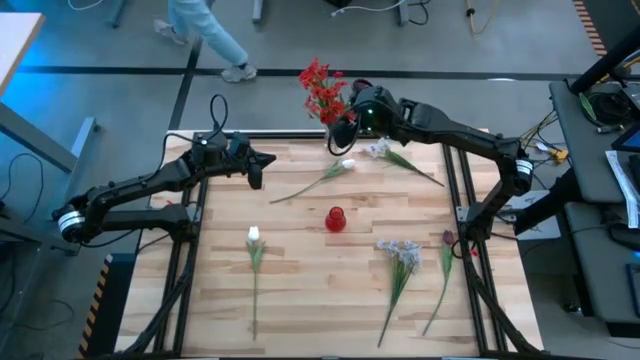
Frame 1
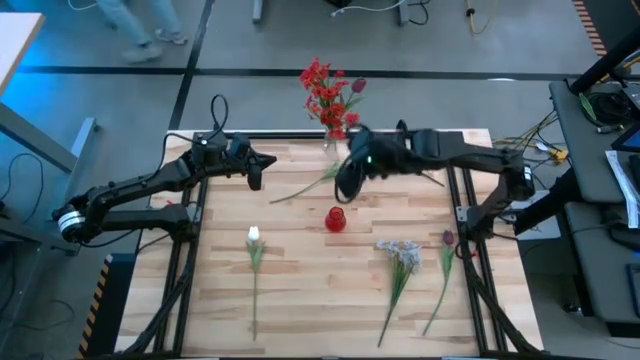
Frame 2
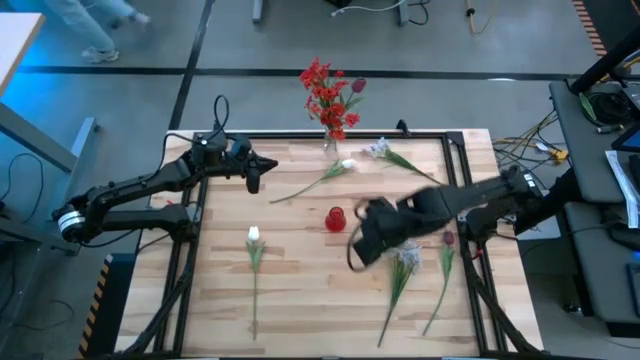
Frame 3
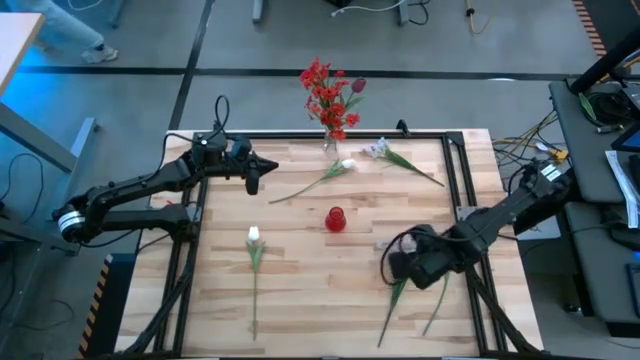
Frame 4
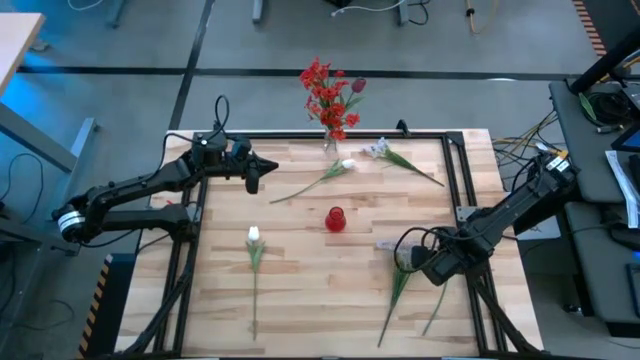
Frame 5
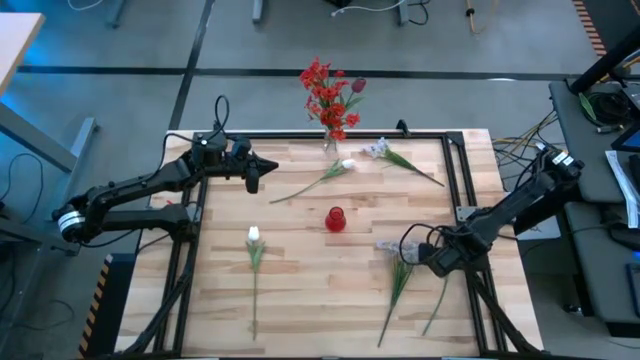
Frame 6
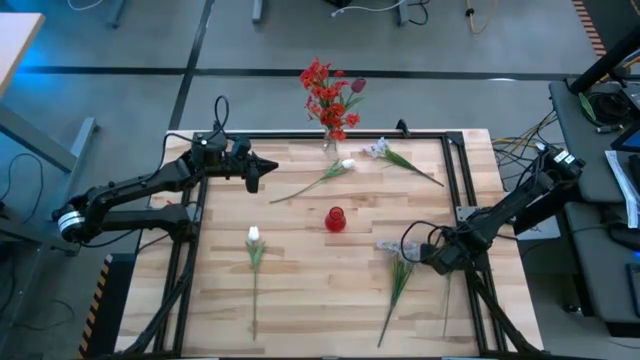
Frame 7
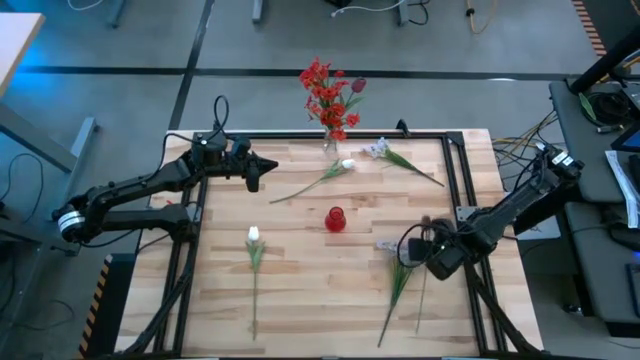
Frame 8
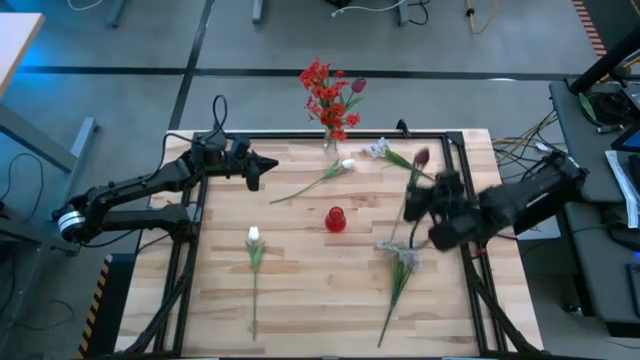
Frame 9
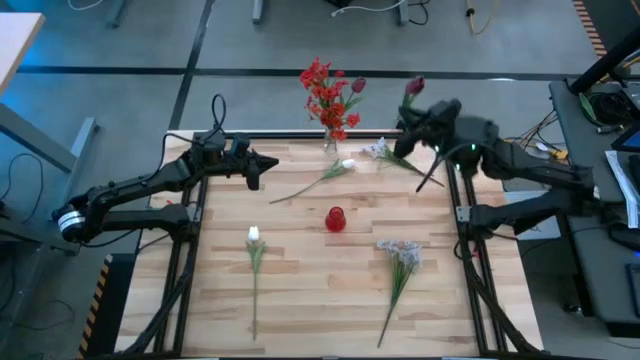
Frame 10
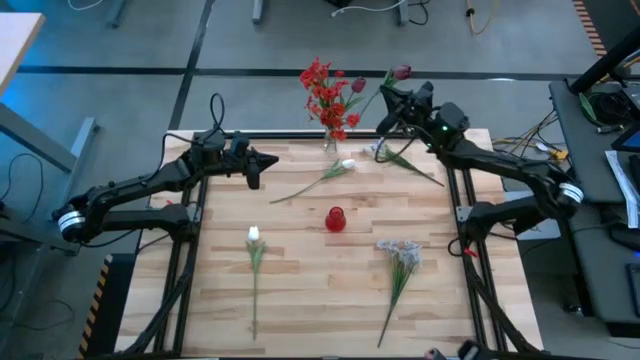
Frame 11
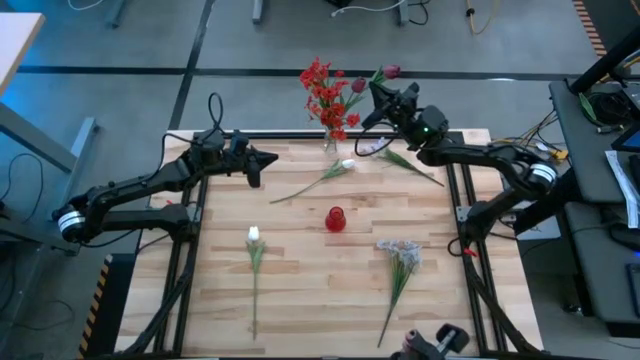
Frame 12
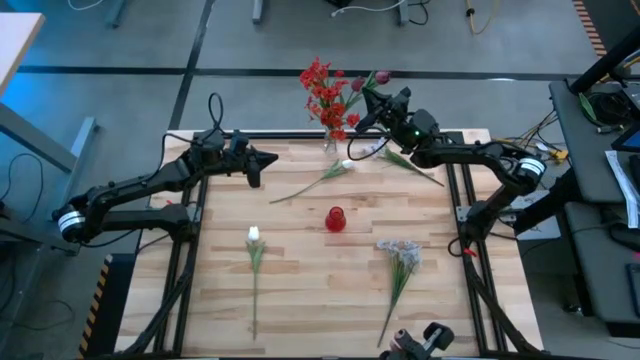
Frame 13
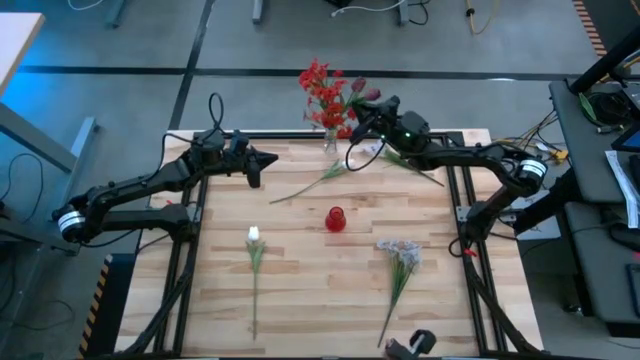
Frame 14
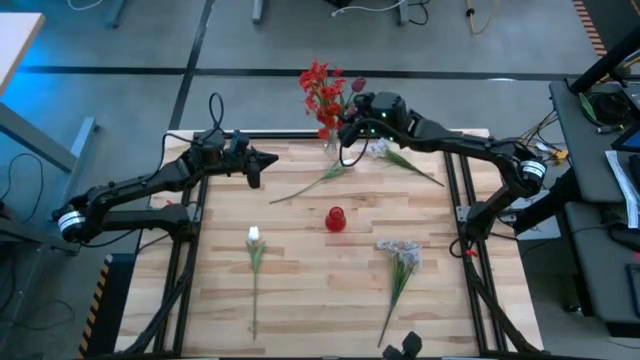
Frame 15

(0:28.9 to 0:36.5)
Task: Sort flowers into vase by color
Put the red tulip into the transparent vase

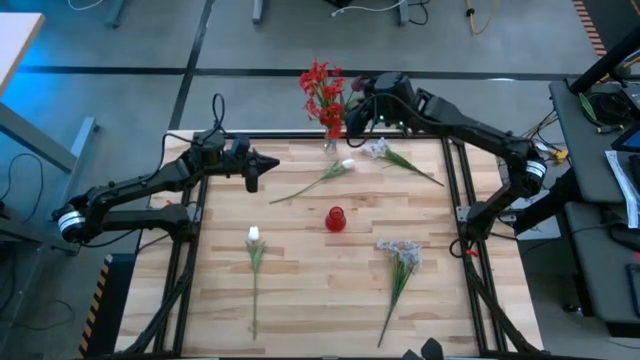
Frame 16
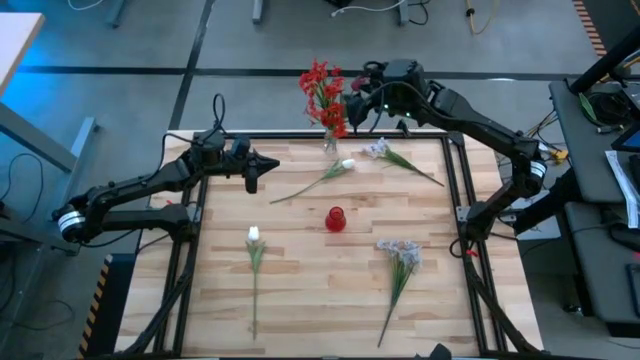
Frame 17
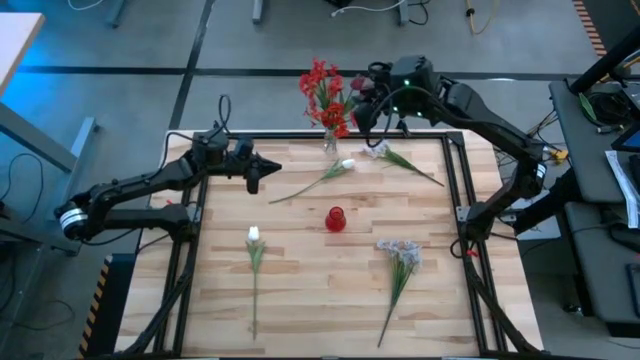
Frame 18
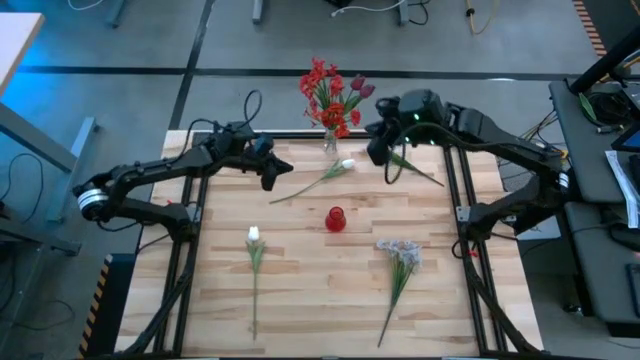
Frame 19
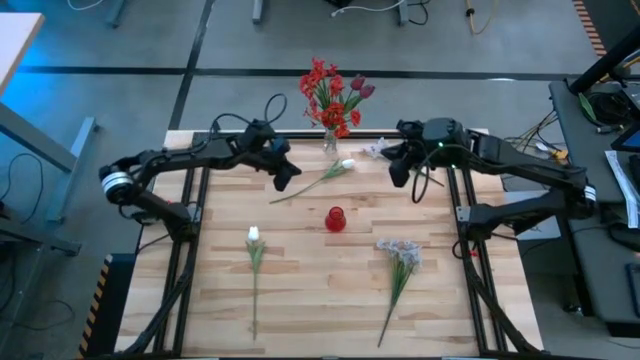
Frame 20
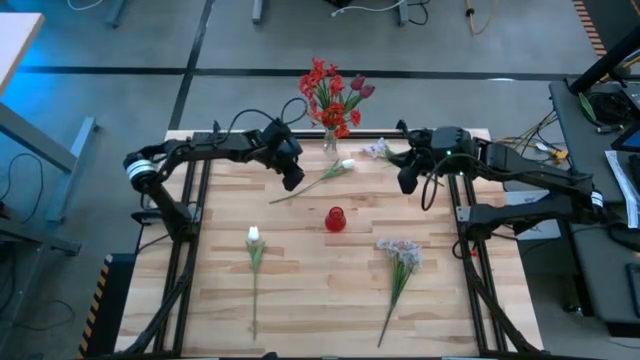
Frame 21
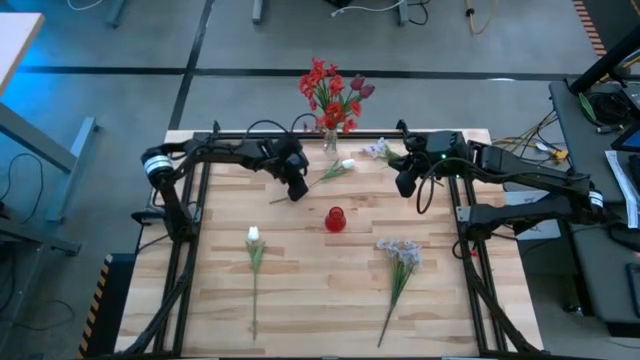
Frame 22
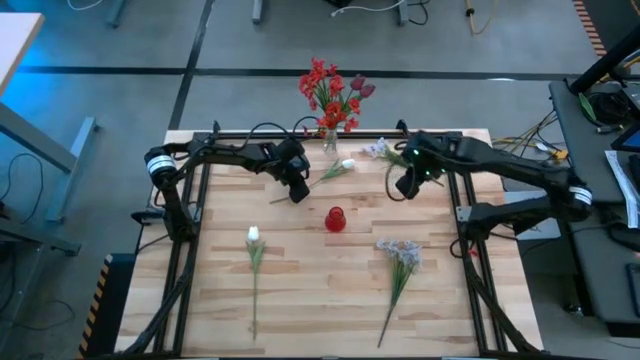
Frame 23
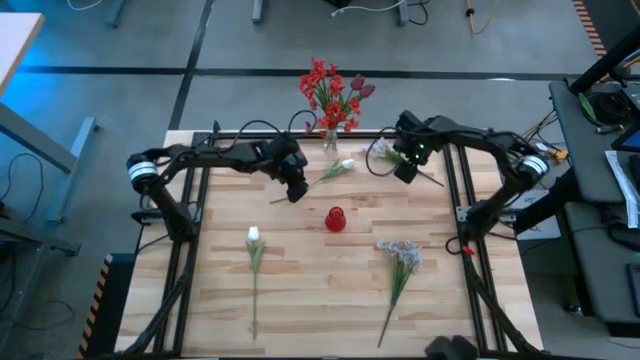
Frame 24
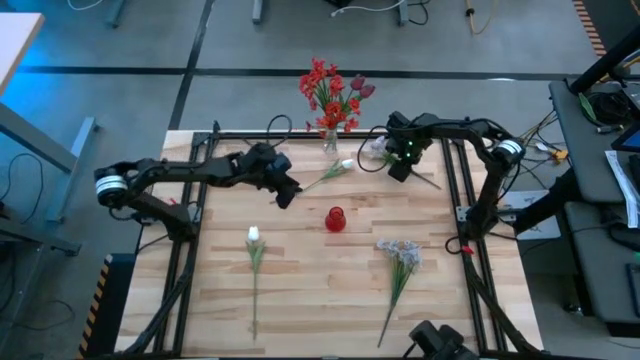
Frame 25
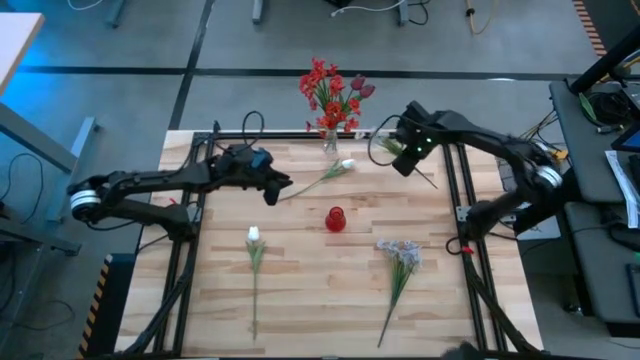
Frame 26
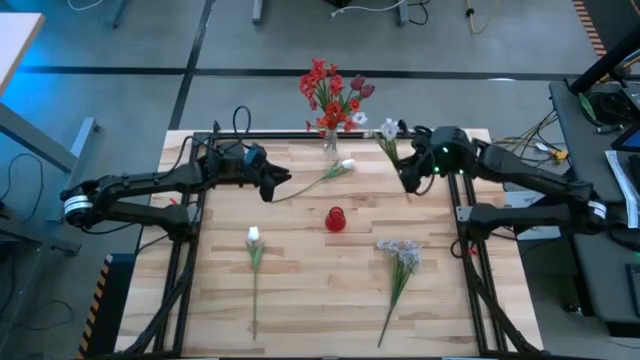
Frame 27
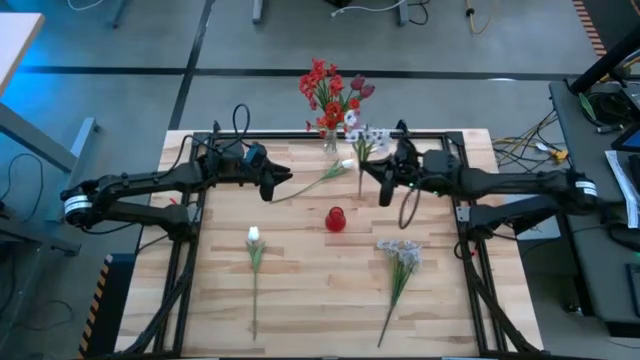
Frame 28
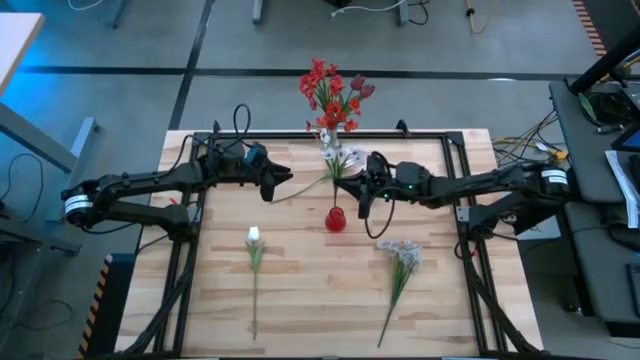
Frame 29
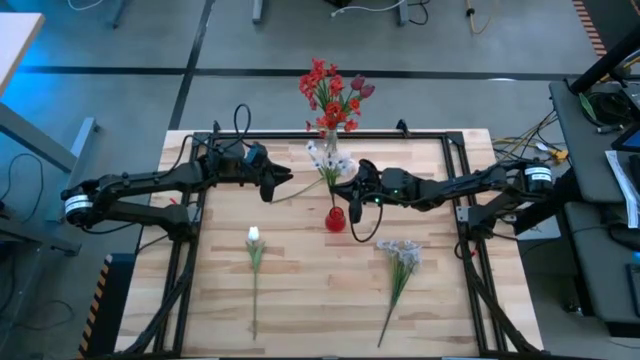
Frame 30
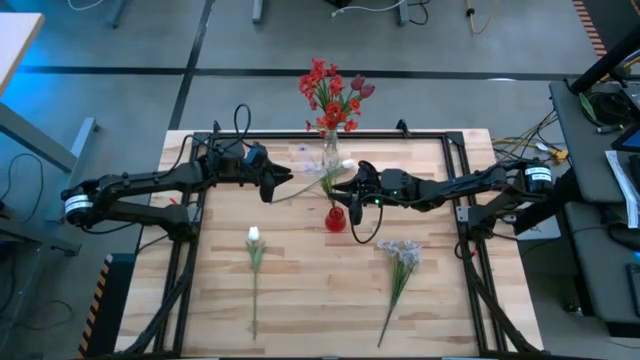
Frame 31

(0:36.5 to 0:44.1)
Put the top white flowers into the red vase

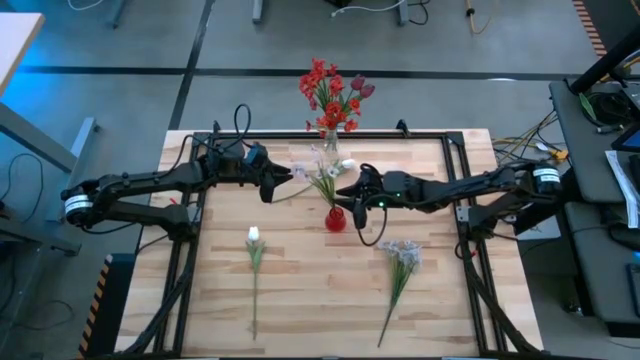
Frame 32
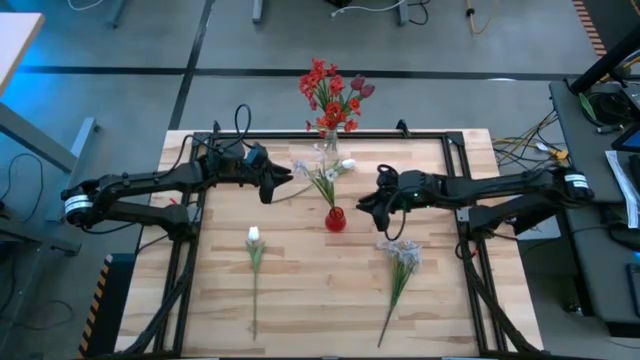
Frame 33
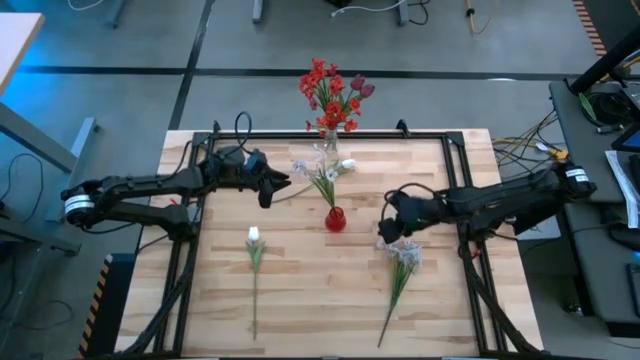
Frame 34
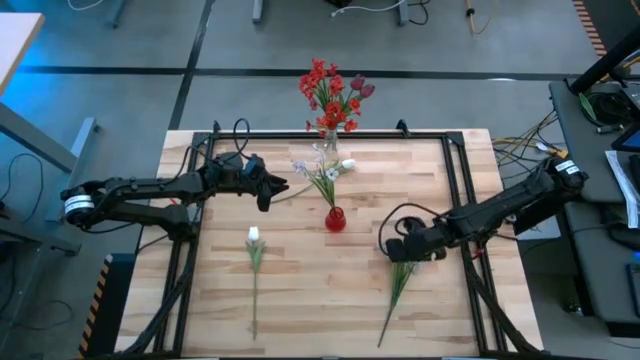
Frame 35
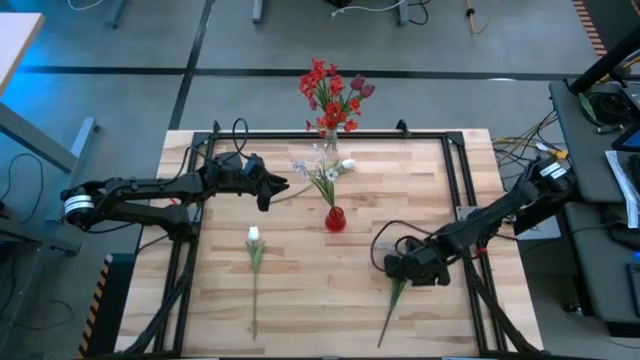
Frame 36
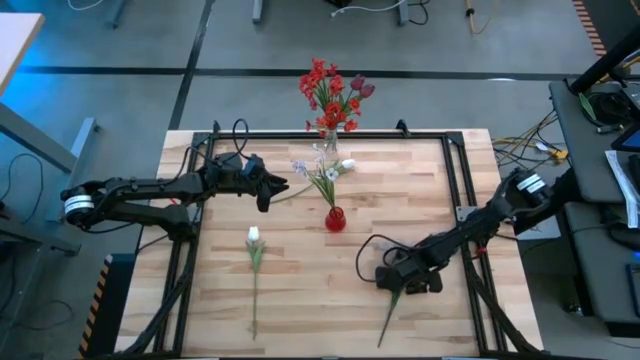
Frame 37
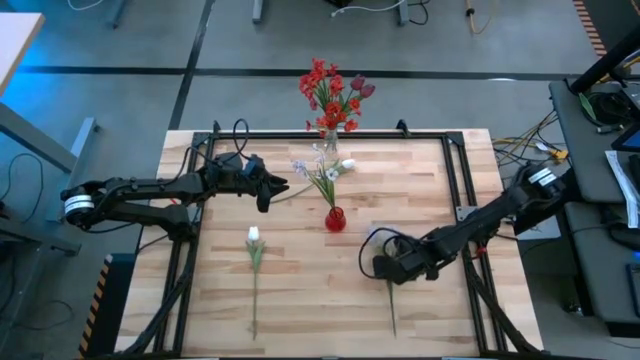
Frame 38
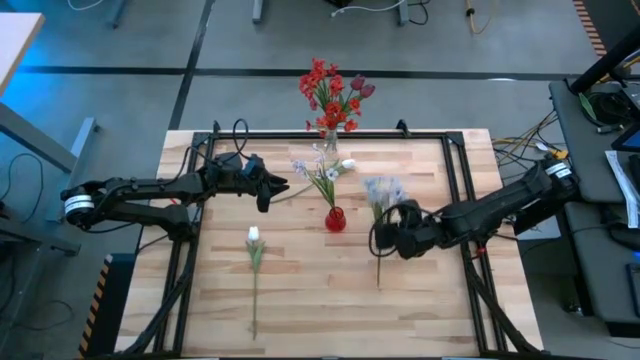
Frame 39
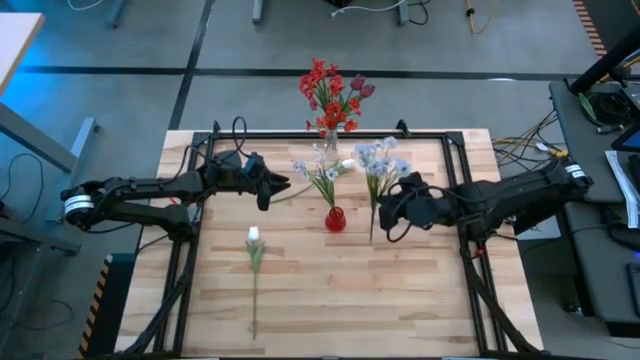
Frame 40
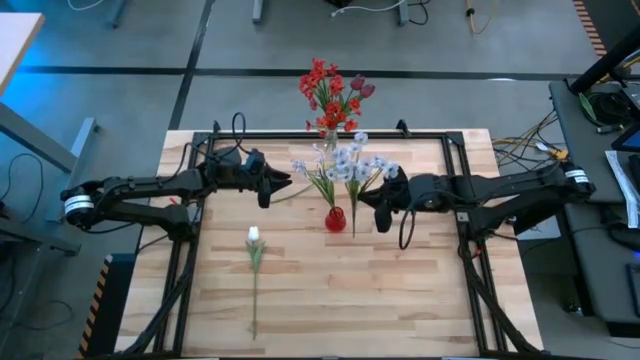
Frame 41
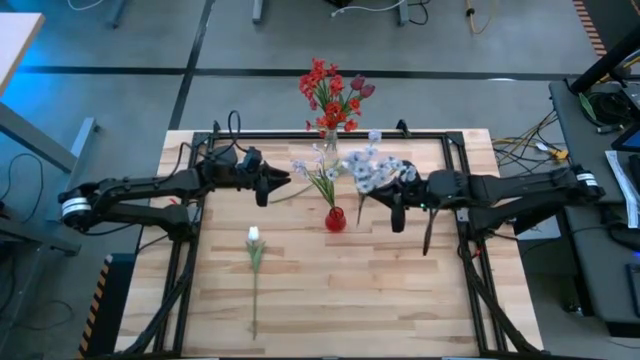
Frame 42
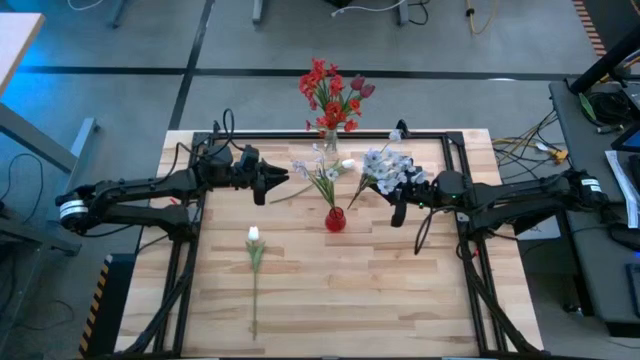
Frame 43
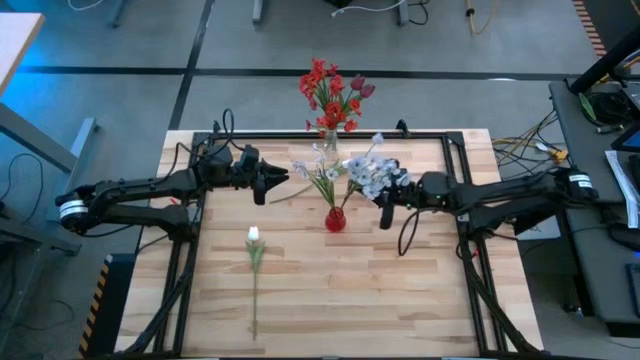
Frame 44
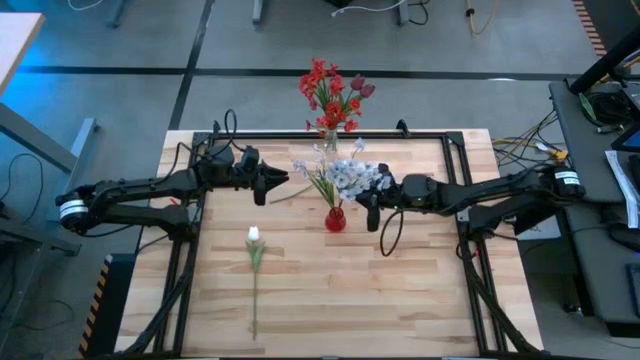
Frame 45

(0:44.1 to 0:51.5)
Put the white flowers into the red vase
